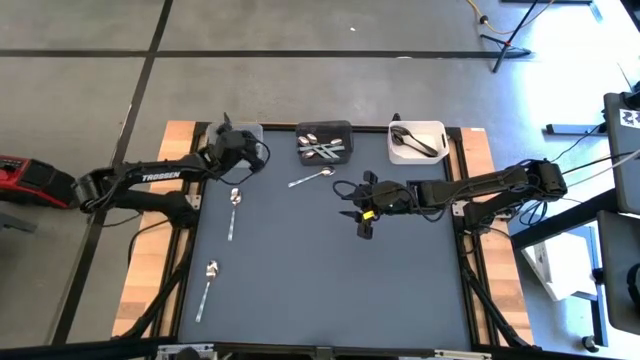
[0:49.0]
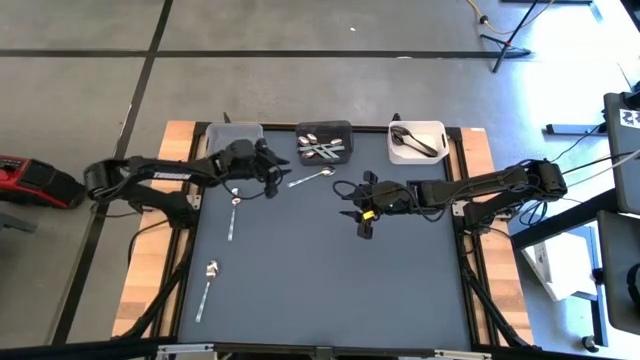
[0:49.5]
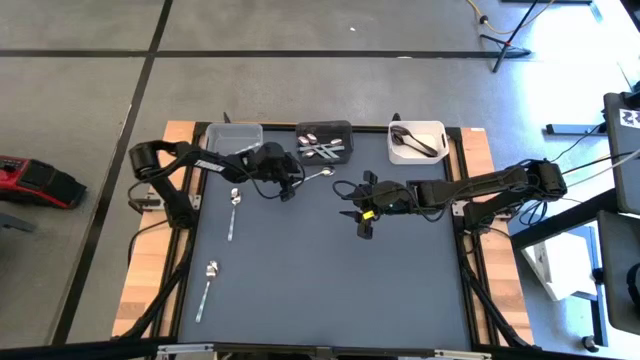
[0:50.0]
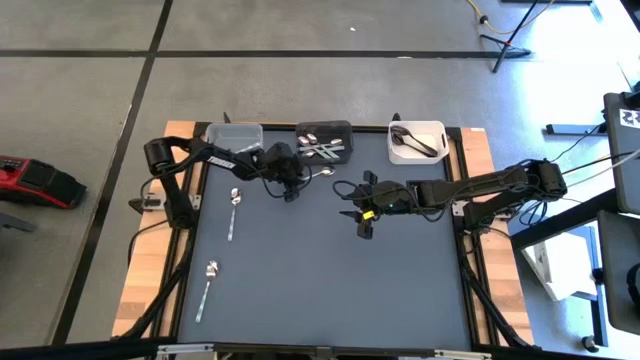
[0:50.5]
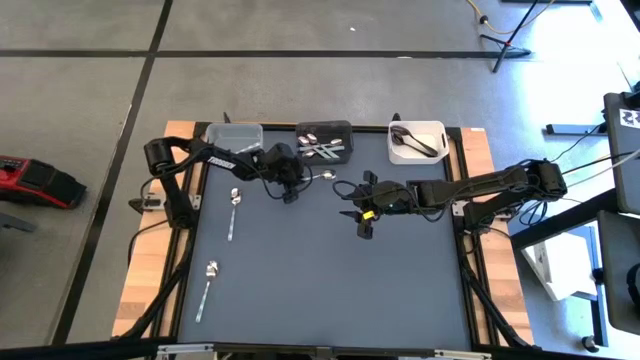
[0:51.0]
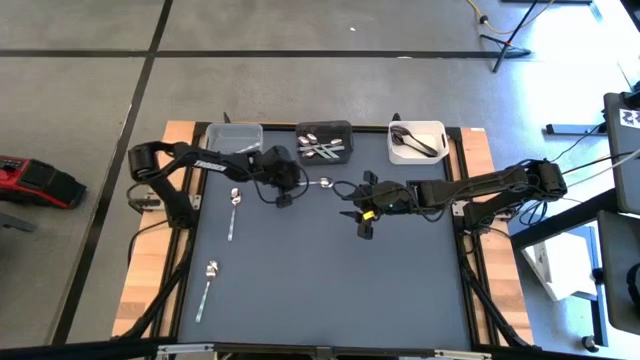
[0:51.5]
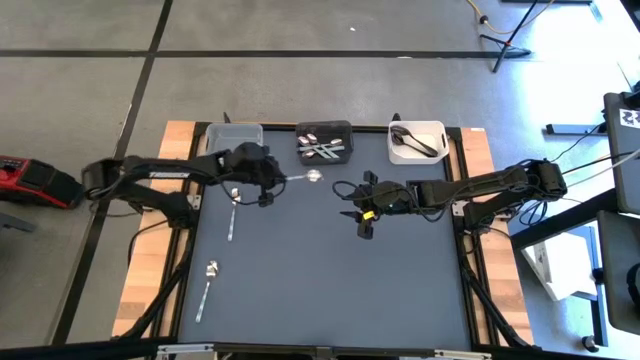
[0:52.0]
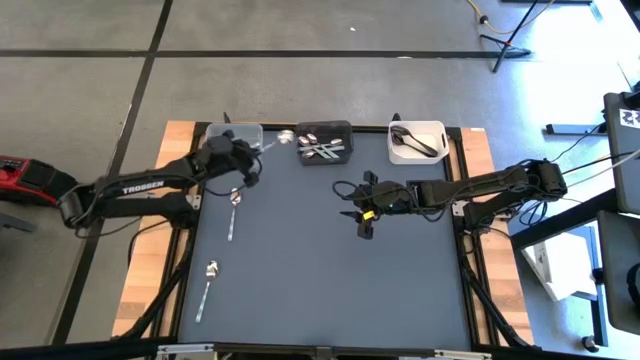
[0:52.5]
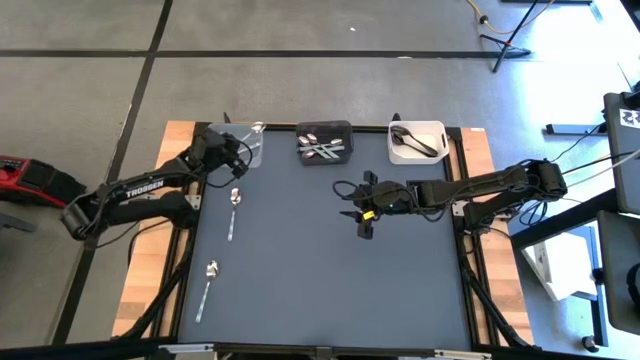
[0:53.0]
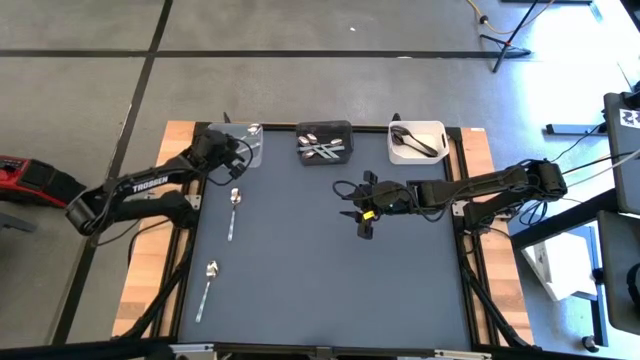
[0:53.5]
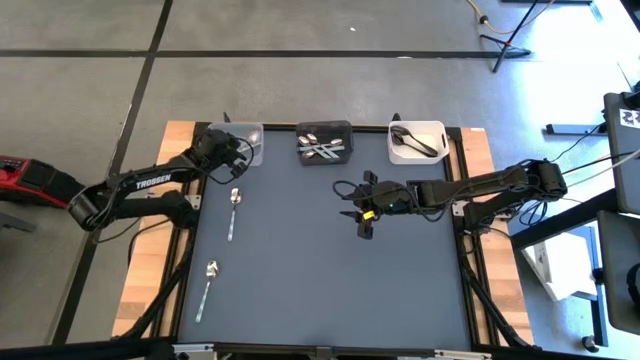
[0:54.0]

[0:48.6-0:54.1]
Task: Sort silverware by color (type)
Put the green spoon into the transparent bin

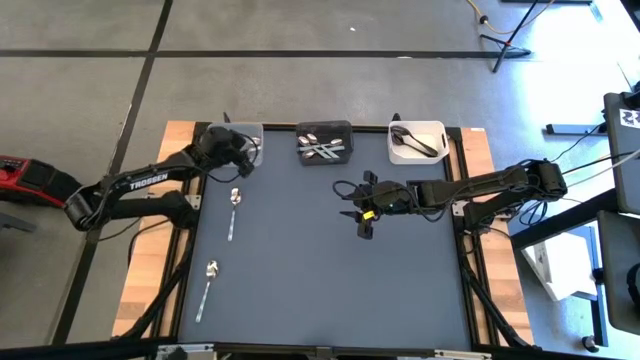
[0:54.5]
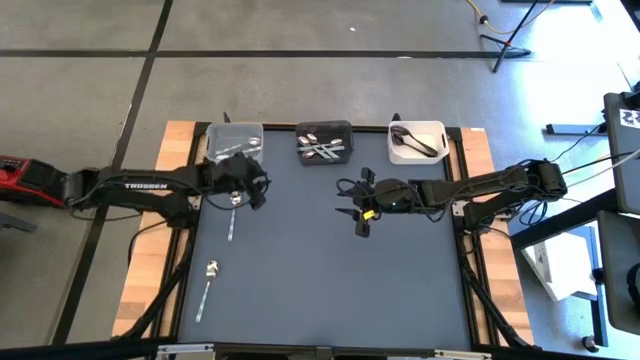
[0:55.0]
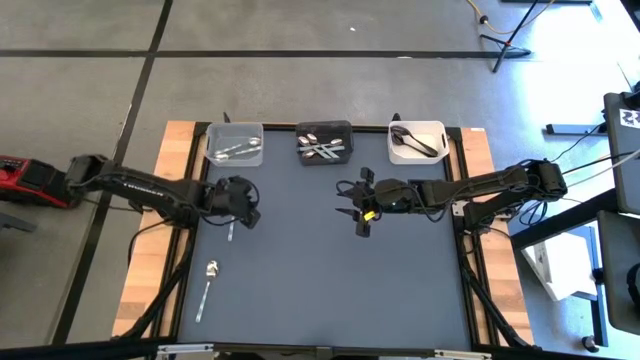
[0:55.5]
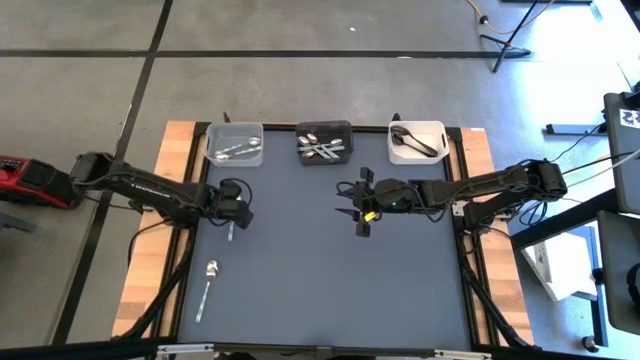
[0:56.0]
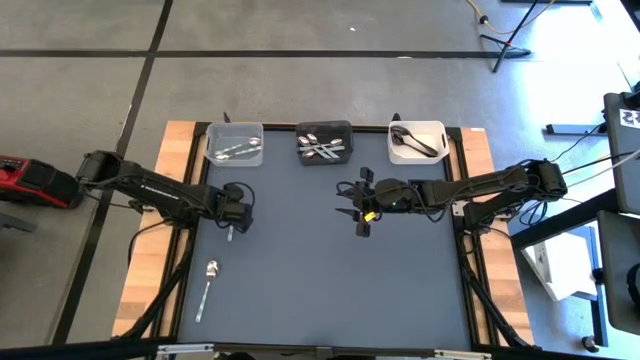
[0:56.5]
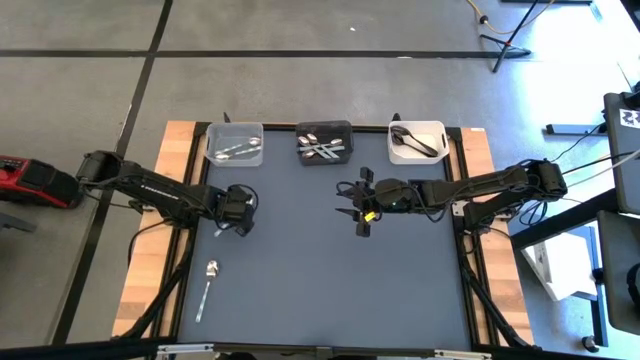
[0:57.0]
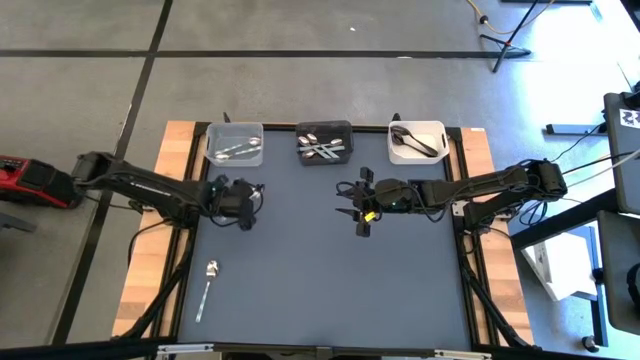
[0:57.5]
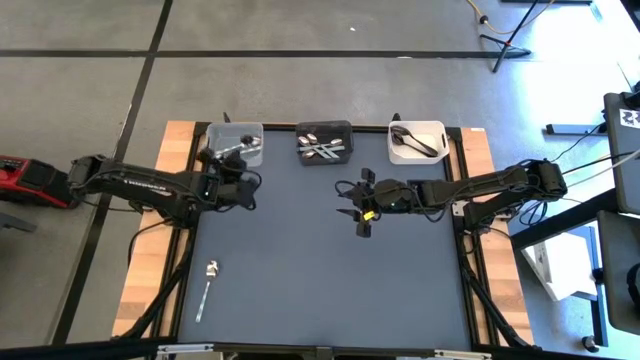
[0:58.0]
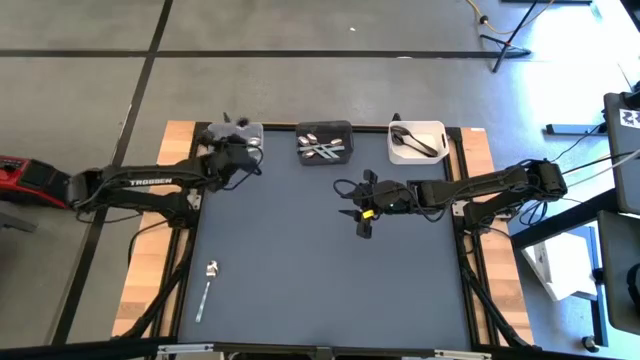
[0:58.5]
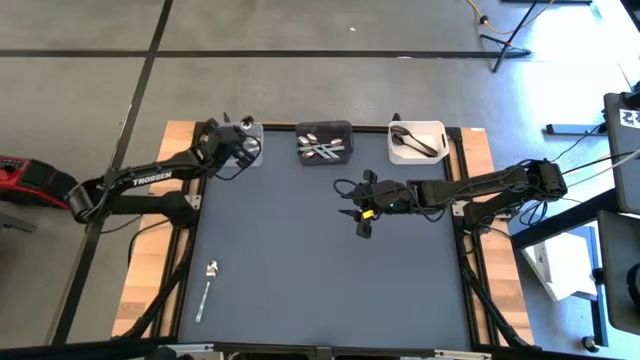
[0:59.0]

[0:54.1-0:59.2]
Put the green spoon into the transparent bin

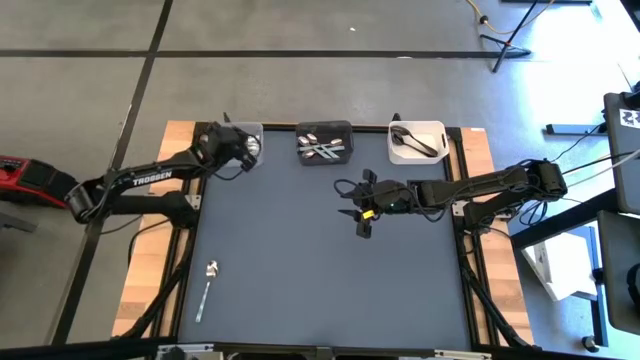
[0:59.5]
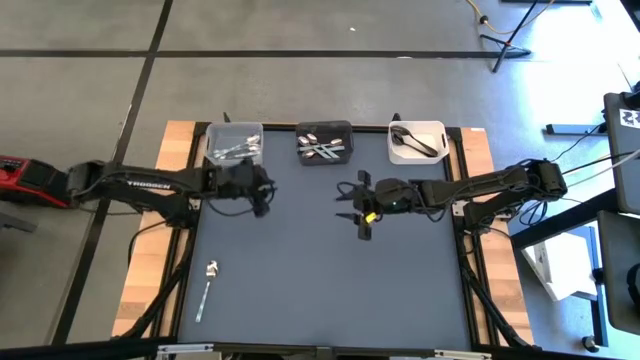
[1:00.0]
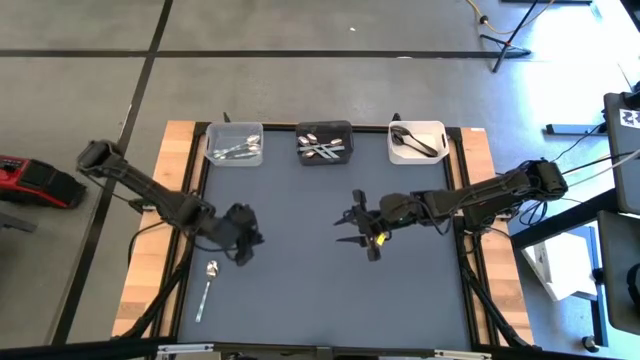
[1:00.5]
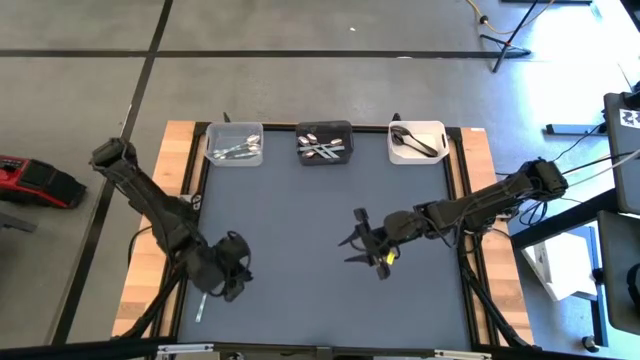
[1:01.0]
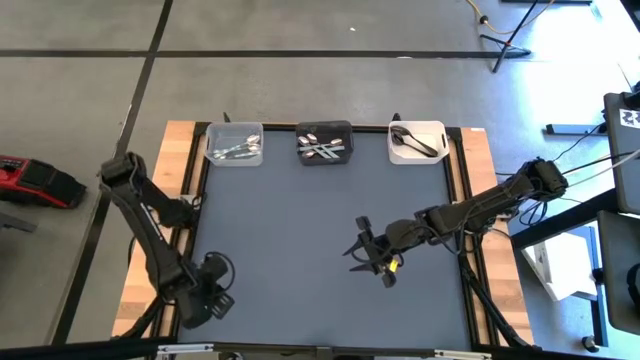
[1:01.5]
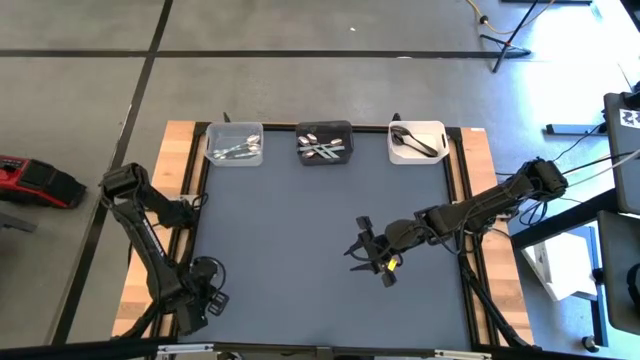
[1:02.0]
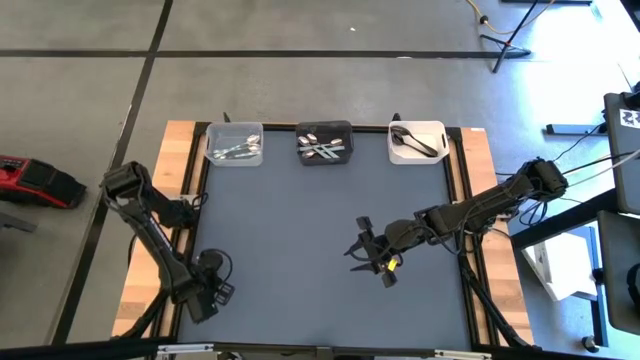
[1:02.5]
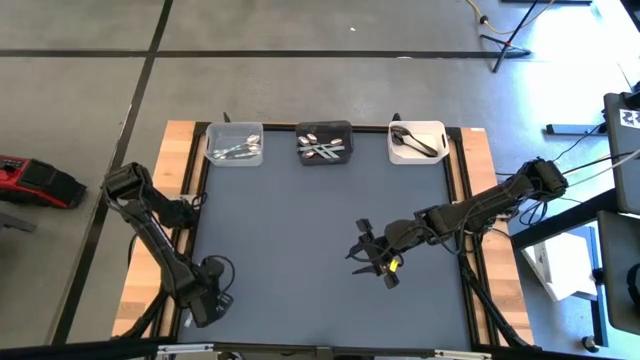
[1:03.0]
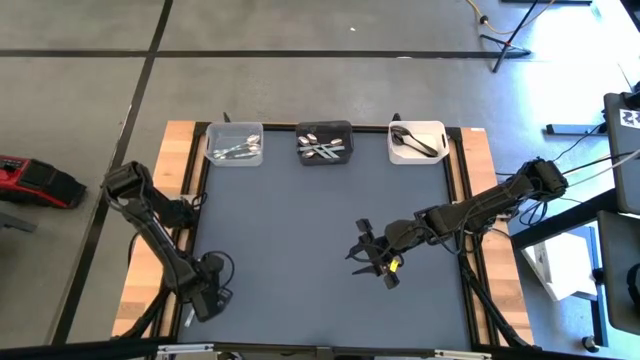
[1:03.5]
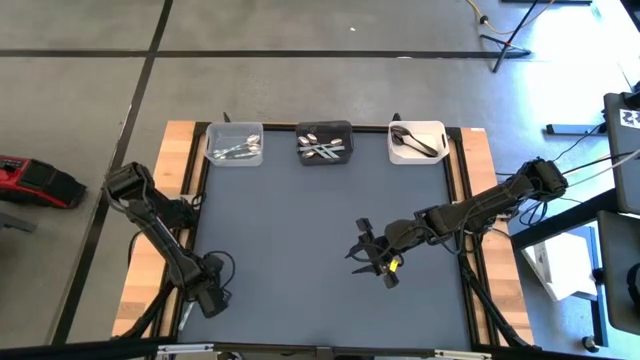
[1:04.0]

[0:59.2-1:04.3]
Put the green spoon into the transparent bin

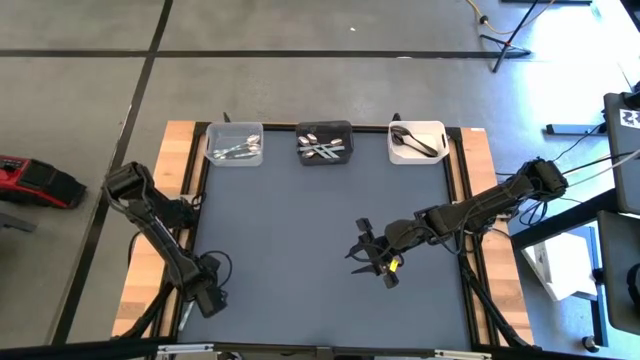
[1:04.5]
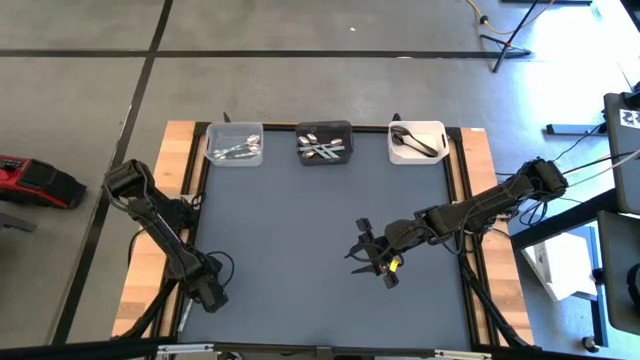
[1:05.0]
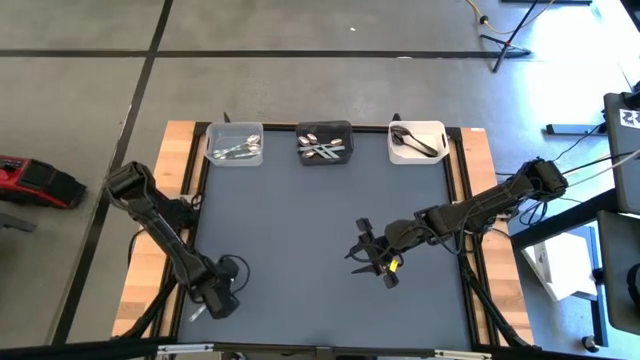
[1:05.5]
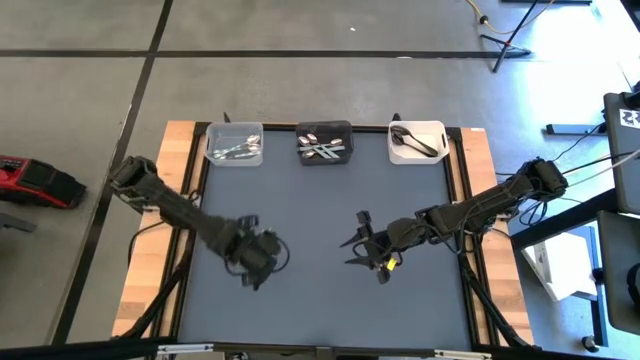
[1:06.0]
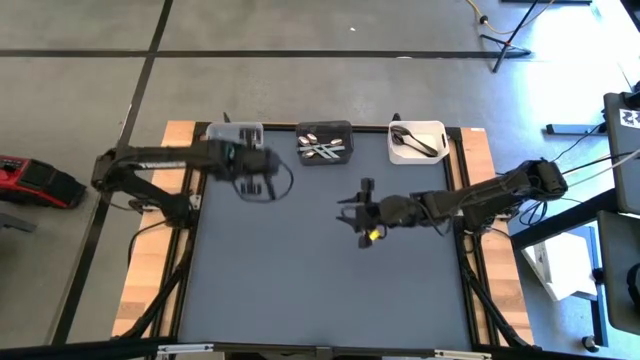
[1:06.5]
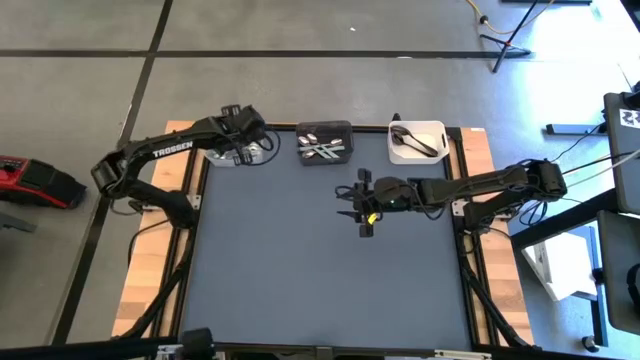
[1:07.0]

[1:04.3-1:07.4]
Put the green spoon into the transparent bin

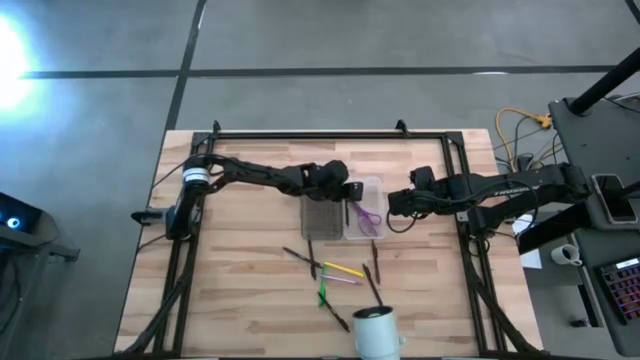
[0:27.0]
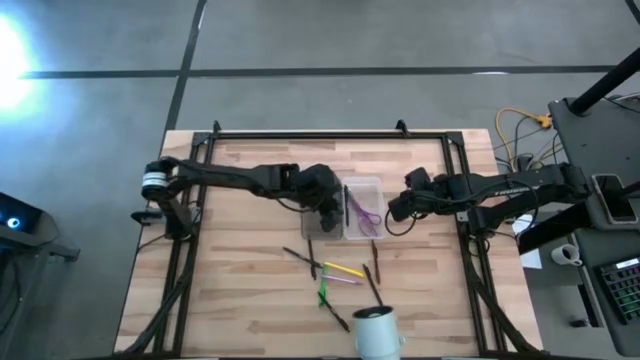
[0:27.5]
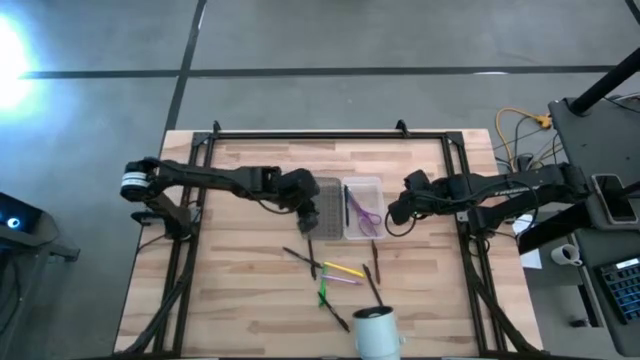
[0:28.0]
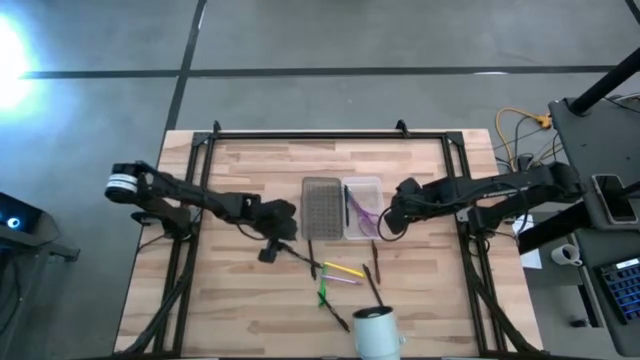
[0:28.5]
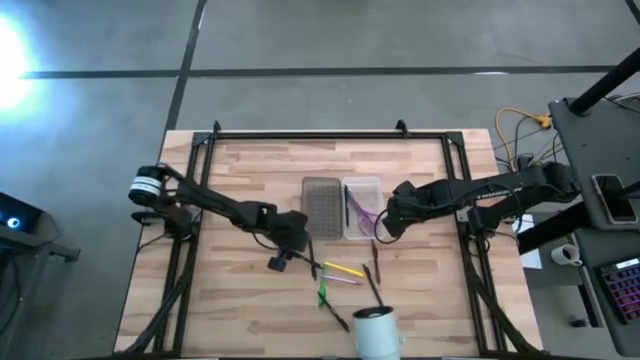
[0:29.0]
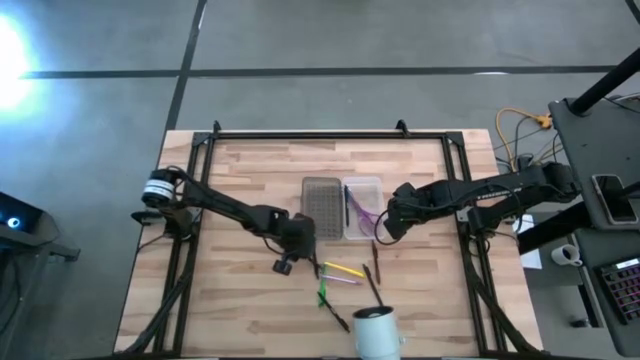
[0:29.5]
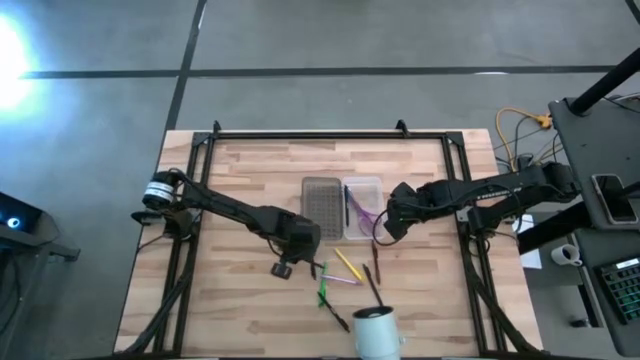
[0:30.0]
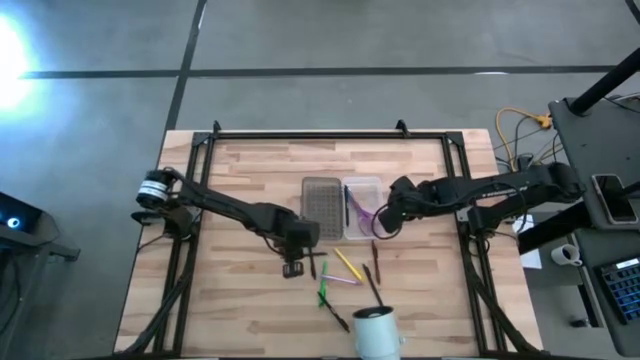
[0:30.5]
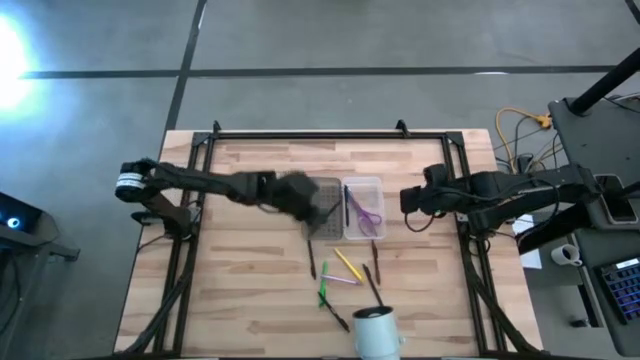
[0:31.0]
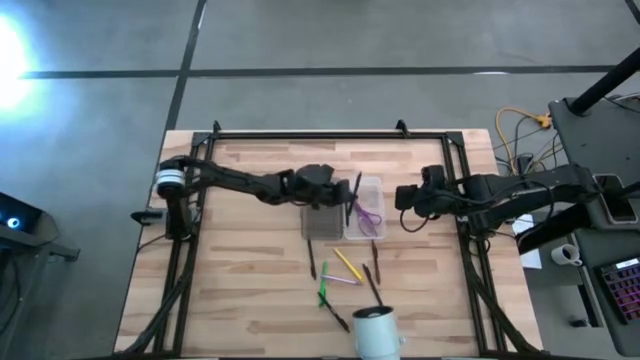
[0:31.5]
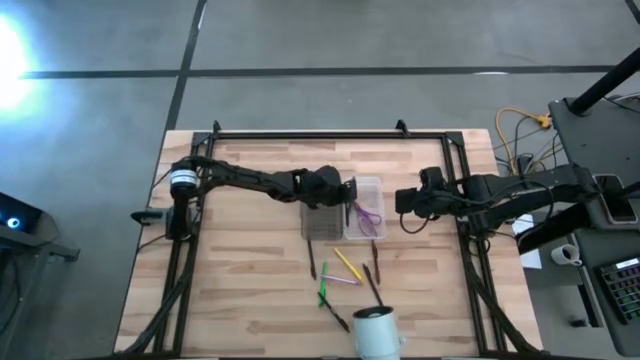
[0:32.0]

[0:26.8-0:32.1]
Task: Pick & place school supplies into a supply box
Put the black pen into the gray supply box
